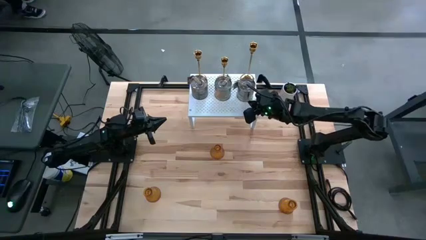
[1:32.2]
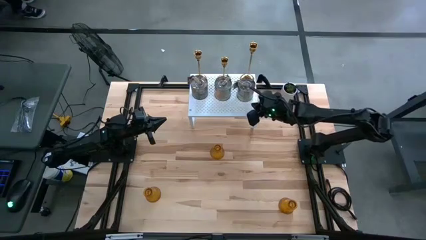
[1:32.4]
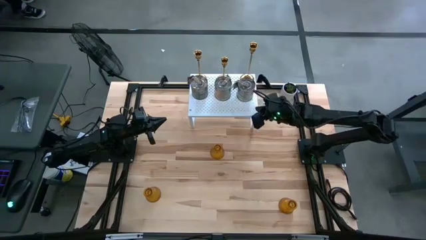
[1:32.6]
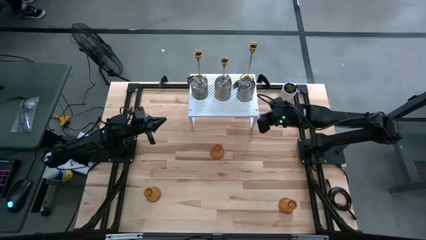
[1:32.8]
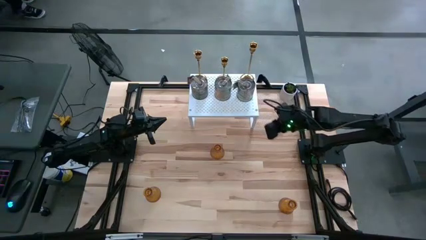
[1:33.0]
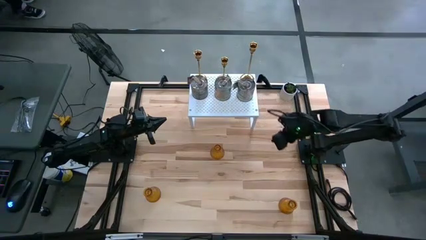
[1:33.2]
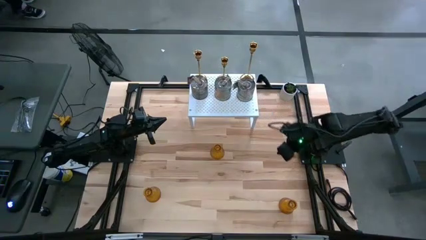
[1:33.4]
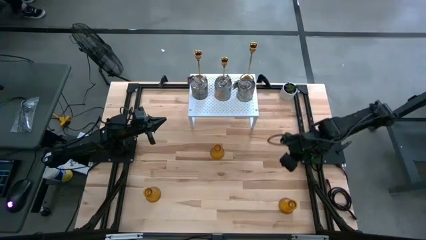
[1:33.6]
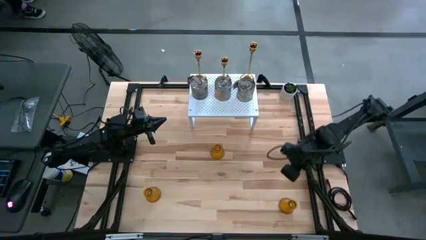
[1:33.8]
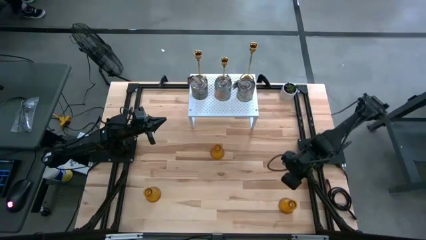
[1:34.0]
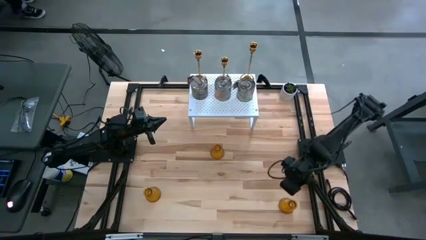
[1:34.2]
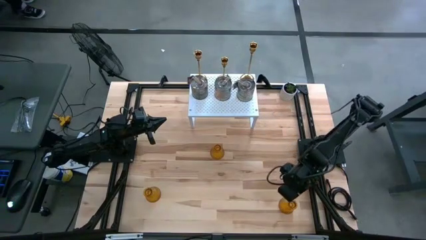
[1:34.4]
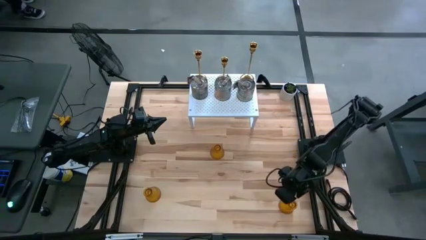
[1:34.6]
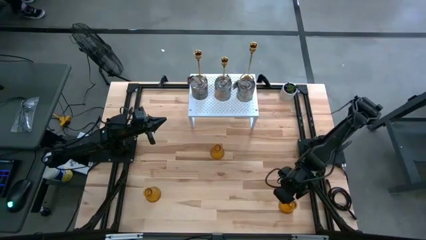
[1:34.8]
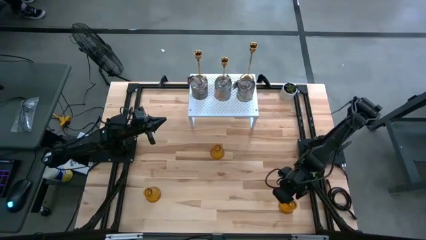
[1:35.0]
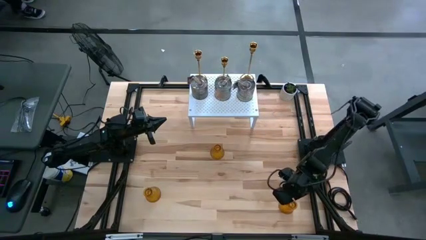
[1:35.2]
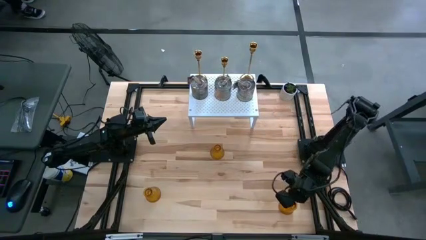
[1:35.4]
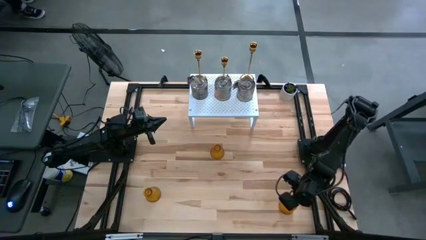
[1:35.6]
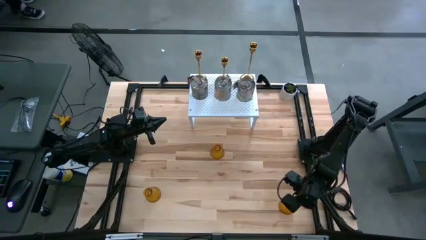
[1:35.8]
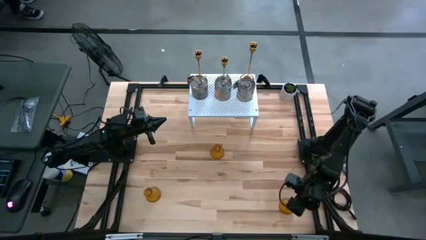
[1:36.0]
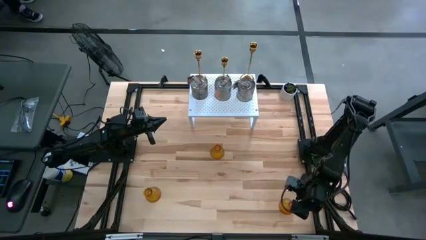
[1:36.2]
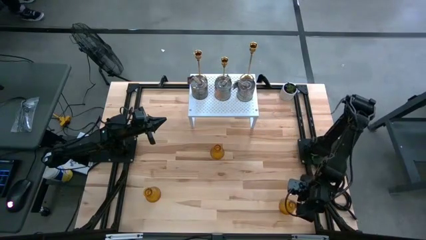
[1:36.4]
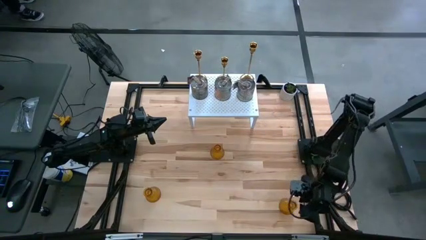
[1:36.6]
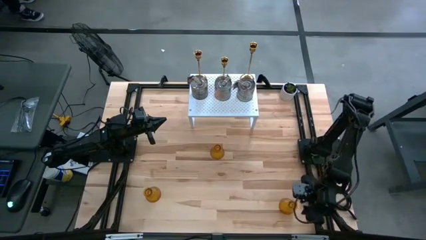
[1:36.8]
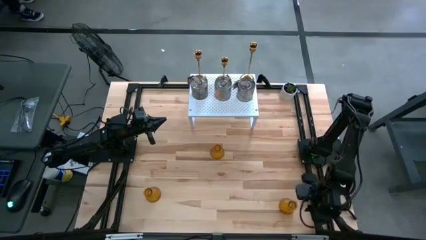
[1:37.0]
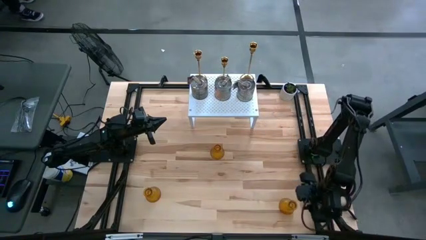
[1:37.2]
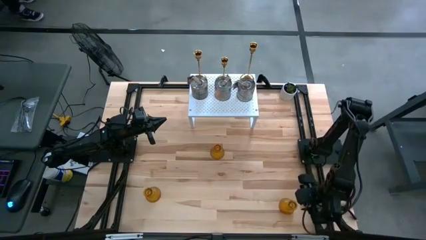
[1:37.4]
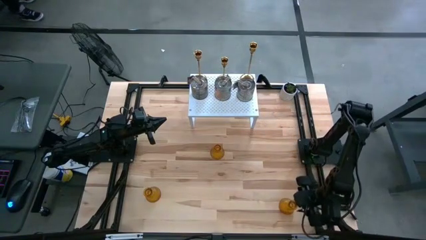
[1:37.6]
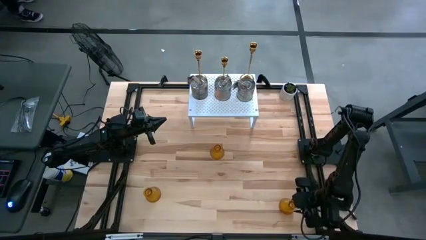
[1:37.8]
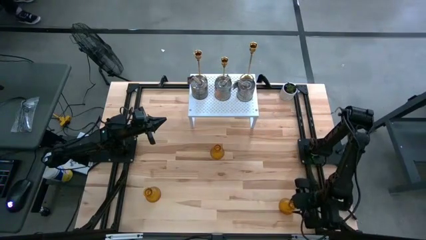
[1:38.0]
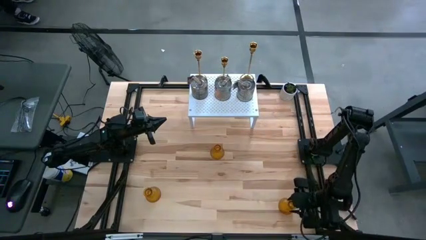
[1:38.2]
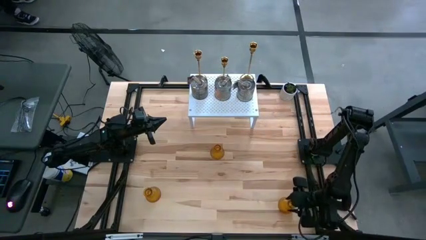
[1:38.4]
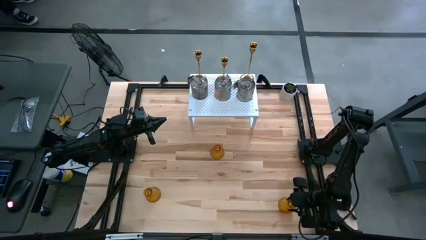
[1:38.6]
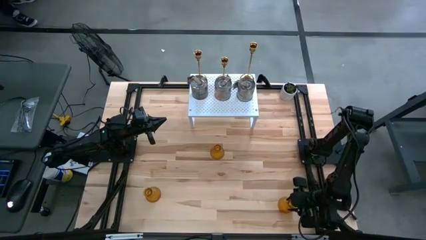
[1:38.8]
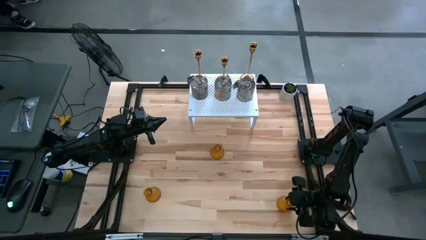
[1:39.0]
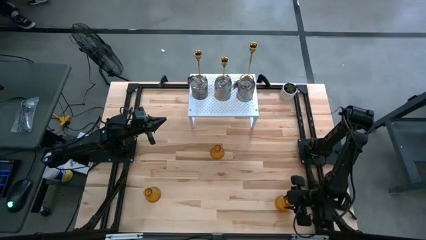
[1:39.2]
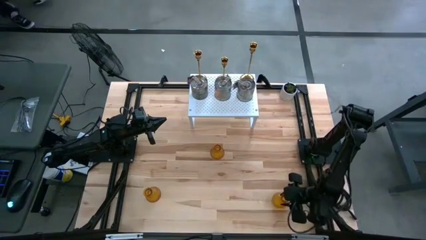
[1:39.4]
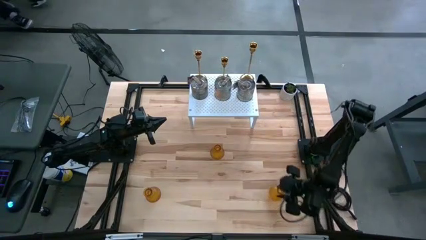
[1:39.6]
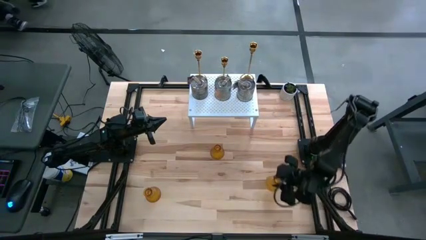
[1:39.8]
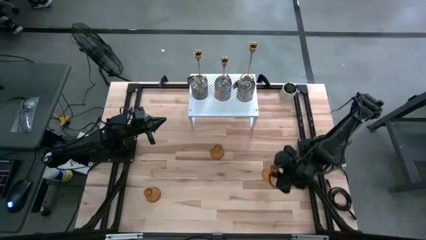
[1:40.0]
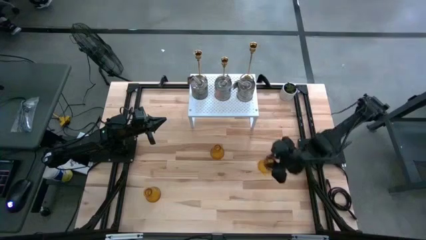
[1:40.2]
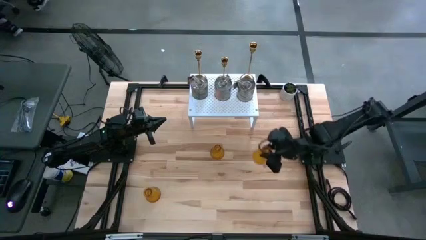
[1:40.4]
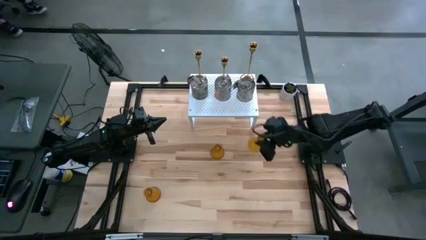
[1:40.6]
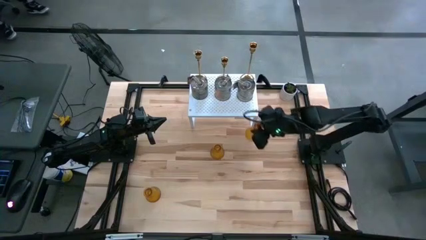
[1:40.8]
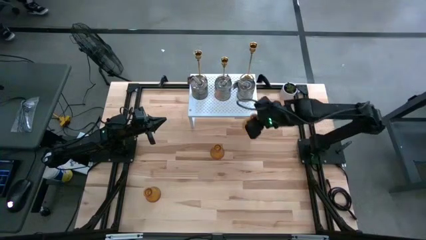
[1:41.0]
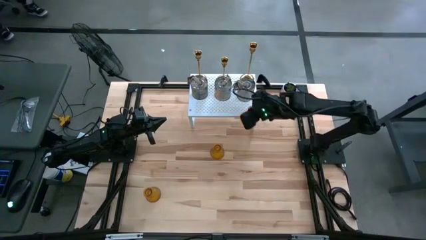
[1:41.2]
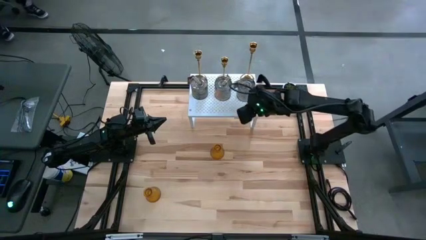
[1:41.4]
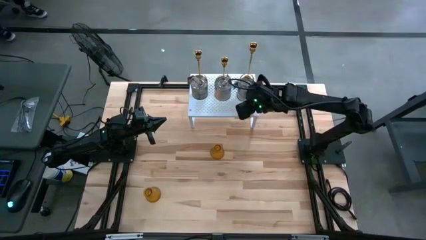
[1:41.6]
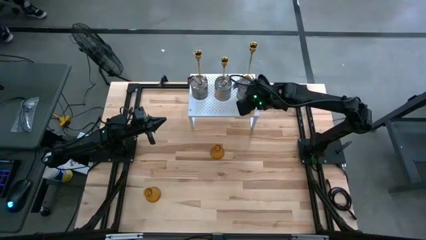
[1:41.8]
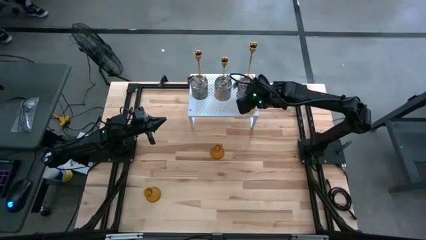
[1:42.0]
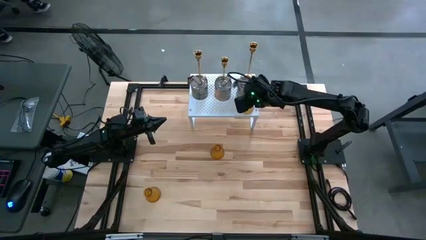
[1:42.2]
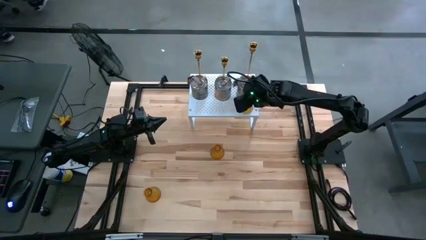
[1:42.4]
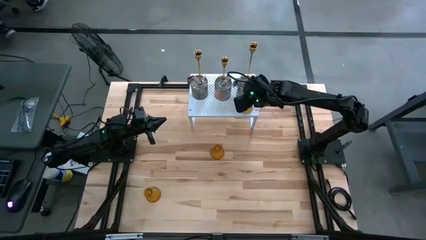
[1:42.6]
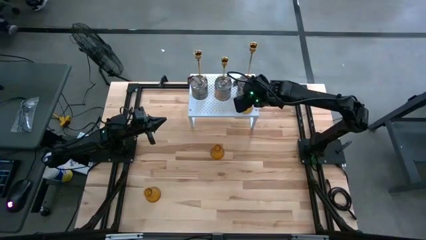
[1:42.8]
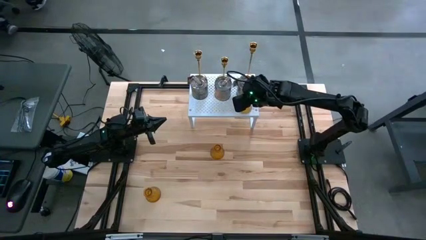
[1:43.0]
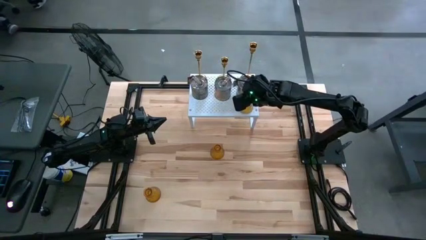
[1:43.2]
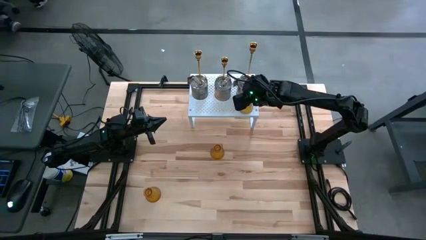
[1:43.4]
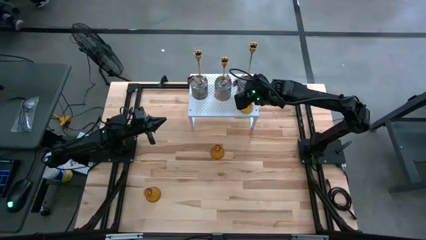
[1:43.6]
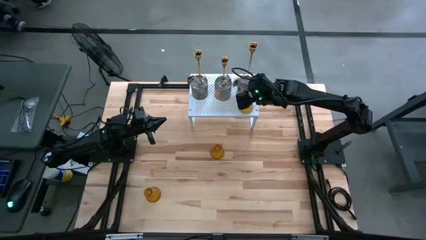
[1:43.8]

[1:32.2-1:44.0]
Task: Pick & Place candle stick holders
Put the bottom right brown glass candle holder on the shelf

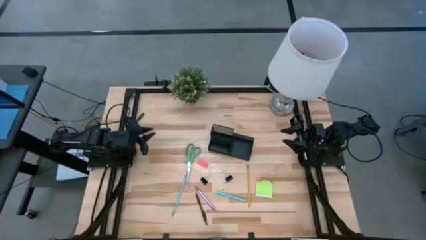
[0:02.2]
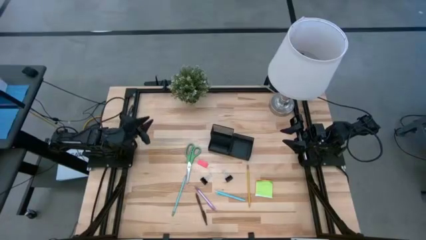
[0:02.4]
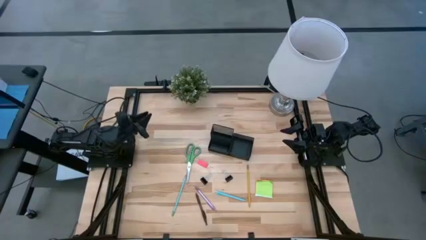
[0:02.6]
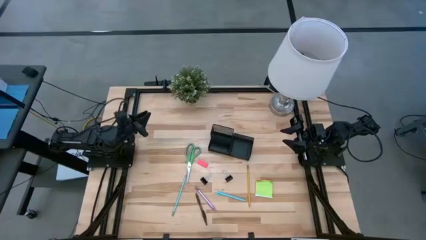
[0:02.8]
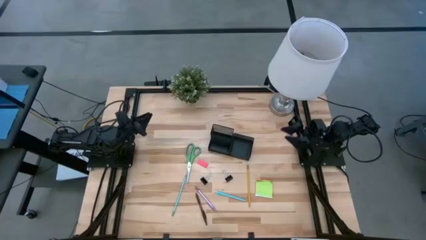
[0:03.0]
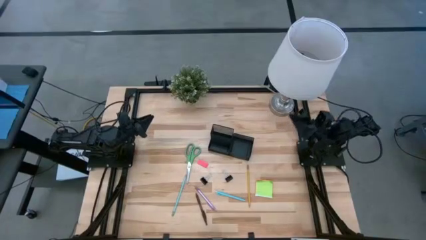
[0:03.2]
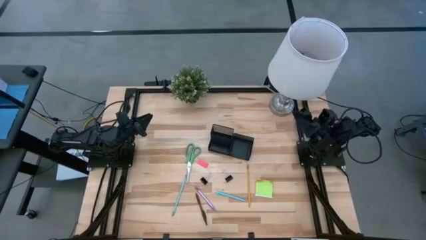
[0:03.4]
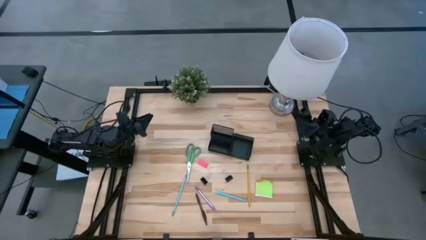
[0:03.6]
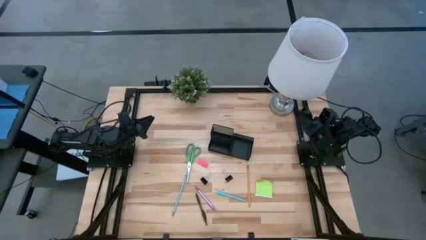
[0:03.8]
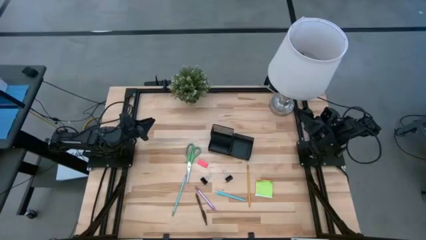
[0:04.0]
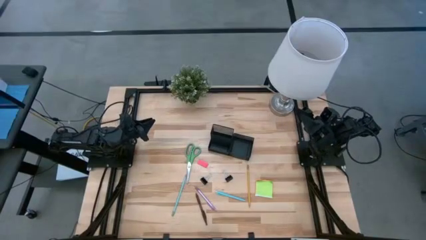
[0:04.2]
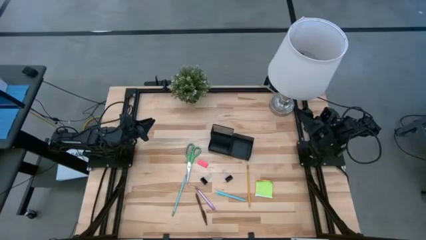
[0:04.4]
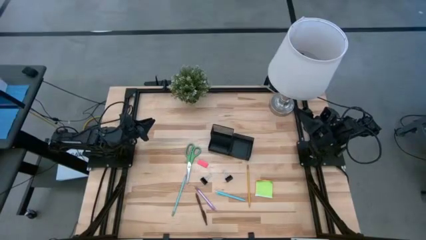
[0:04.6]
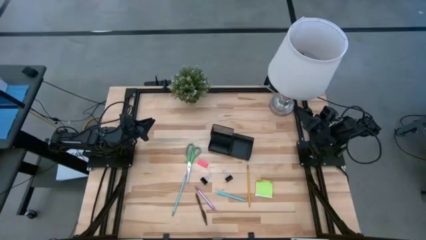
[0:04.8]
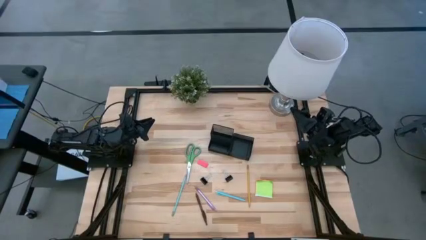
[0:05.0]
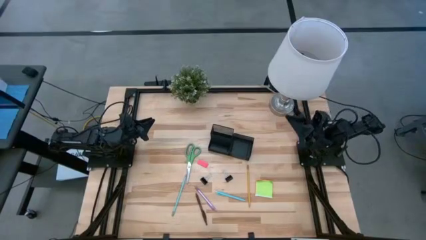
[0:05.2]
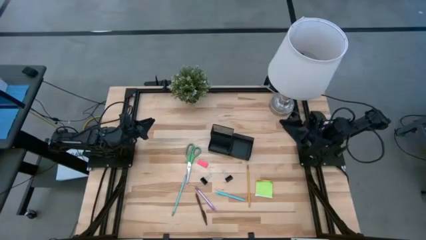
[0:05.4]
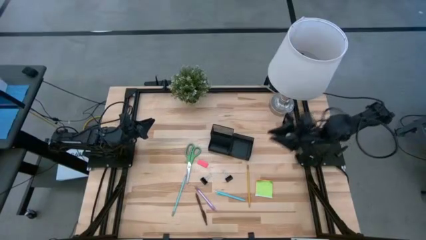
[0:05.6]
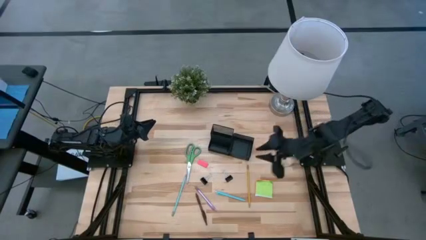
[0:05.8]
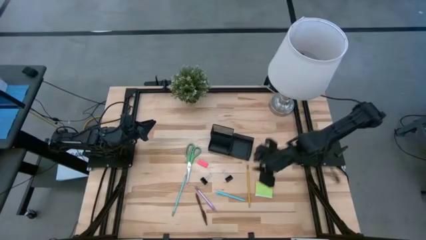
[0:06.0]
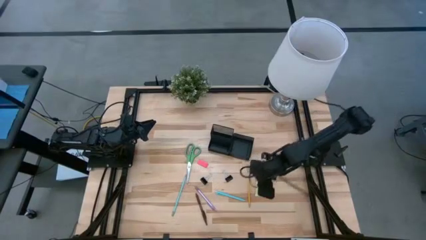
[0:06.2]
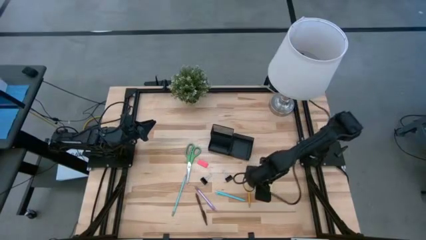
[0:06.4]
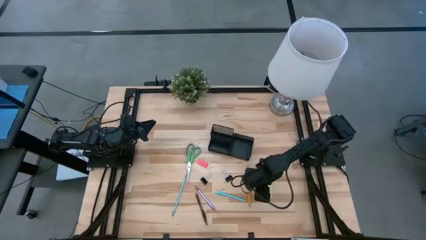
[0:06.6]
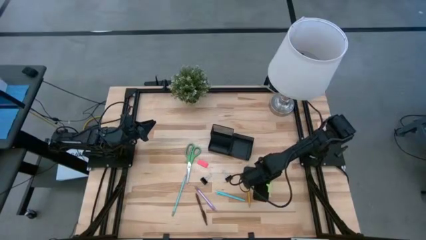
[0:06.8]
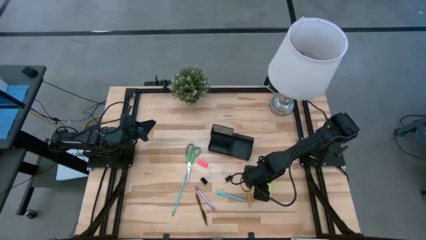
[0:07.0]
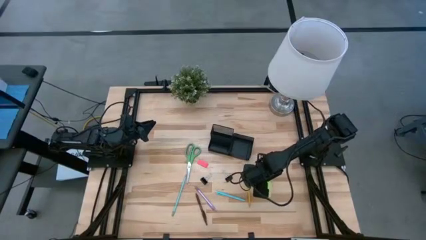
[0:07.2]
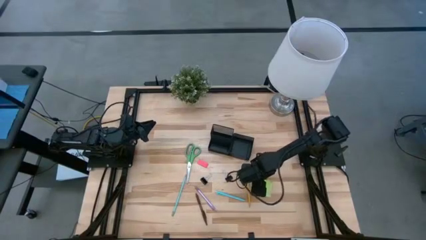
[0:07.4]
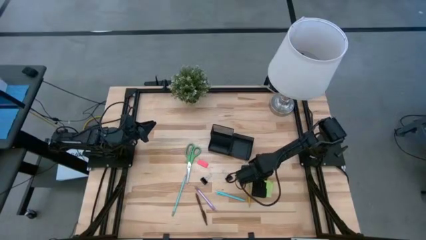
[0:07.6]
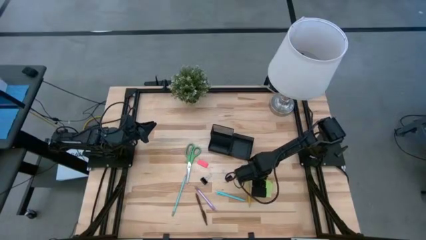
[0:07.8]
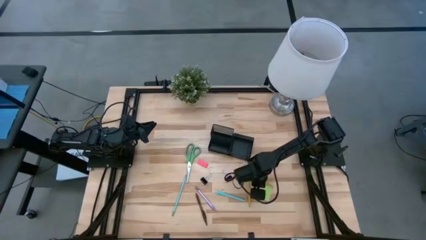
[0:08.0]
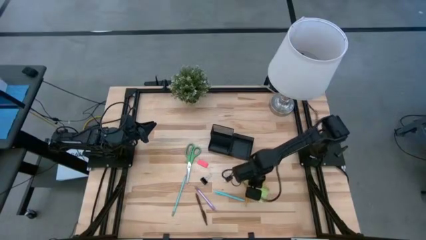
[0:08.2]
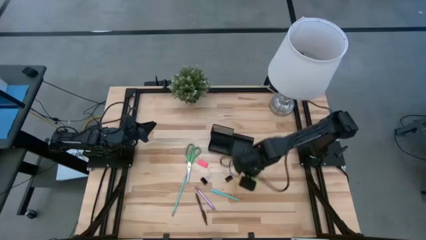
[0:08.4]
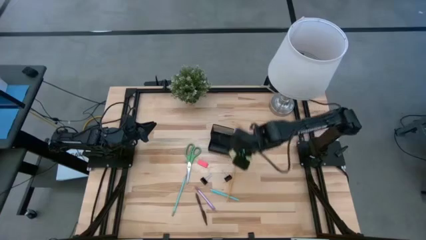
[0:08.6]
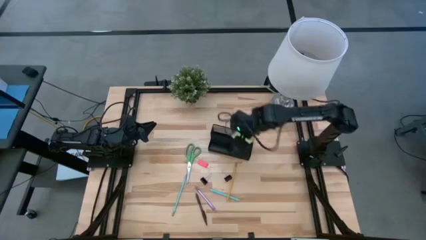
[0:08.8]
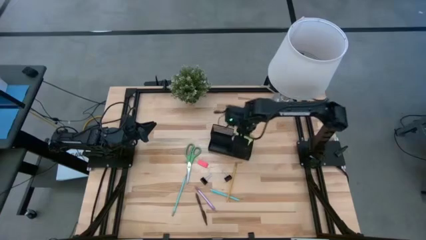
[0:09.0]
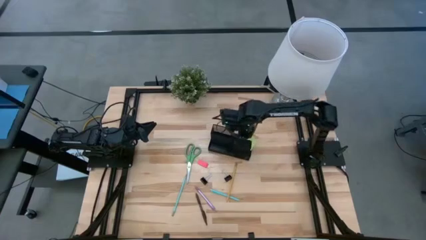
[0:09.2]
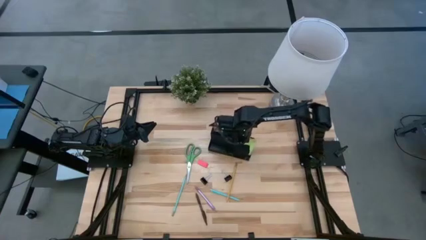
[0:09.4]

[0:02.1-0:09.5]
Task: Pick and place office supplies into organizer
Put the green sticky notes on the black desk organizer
